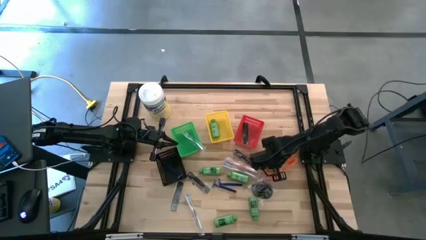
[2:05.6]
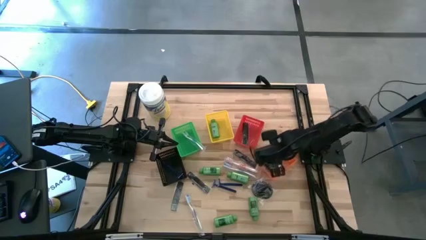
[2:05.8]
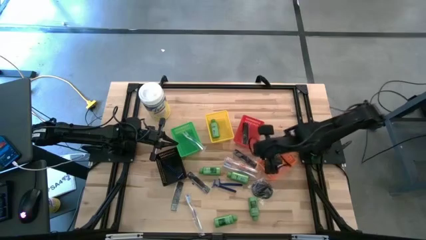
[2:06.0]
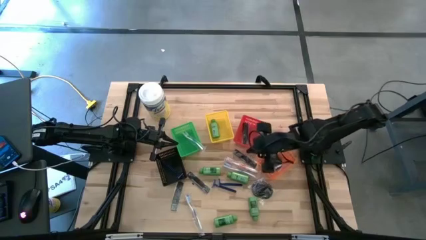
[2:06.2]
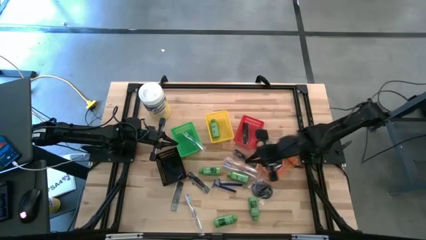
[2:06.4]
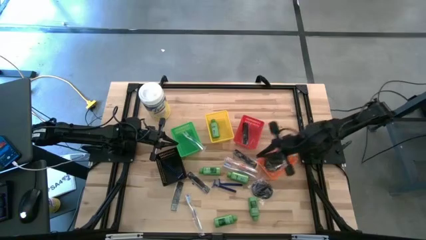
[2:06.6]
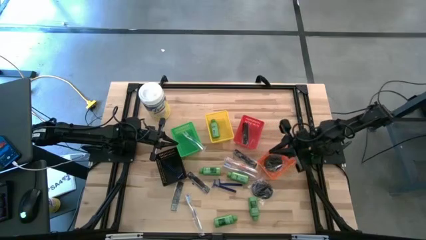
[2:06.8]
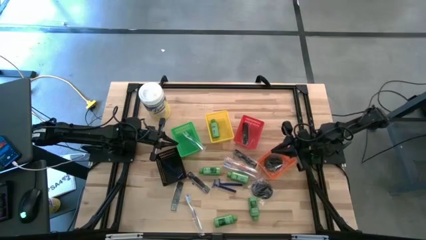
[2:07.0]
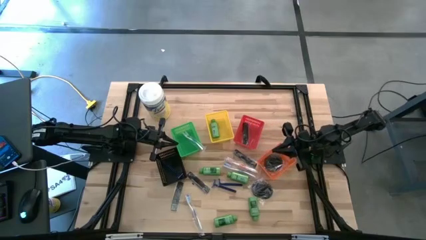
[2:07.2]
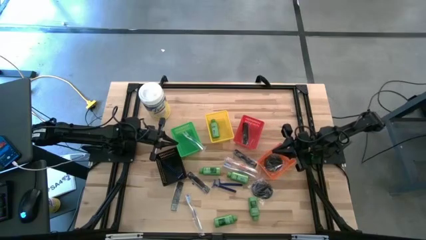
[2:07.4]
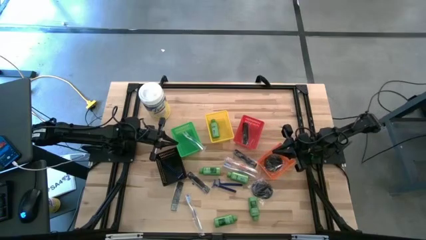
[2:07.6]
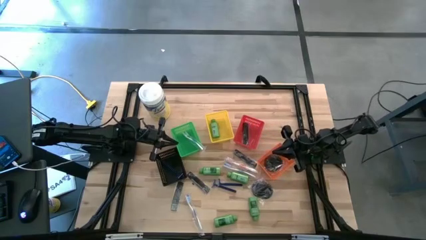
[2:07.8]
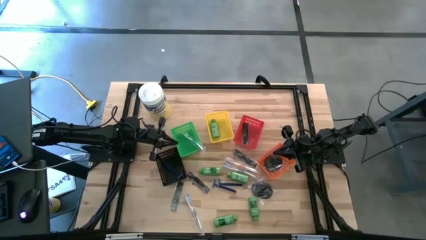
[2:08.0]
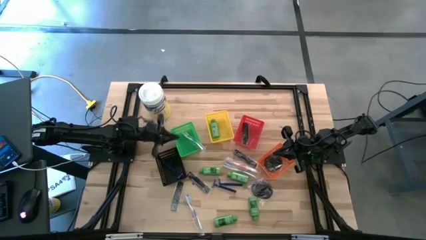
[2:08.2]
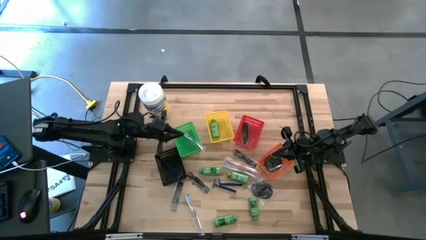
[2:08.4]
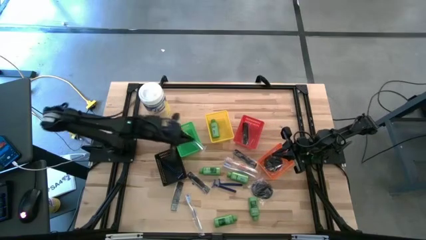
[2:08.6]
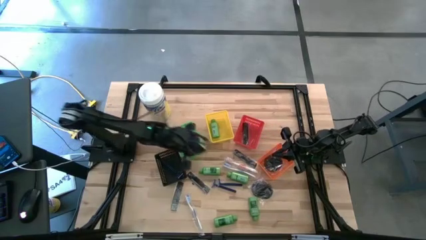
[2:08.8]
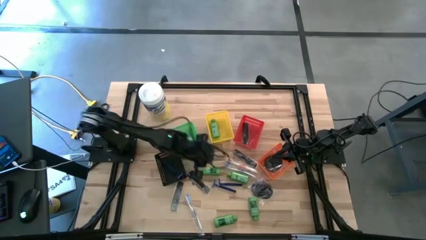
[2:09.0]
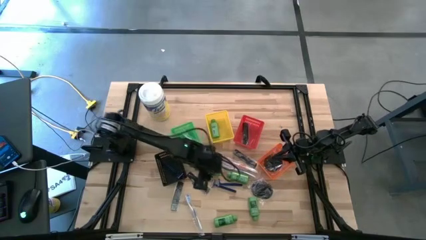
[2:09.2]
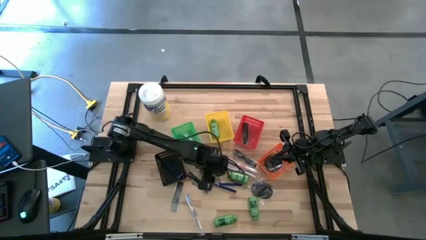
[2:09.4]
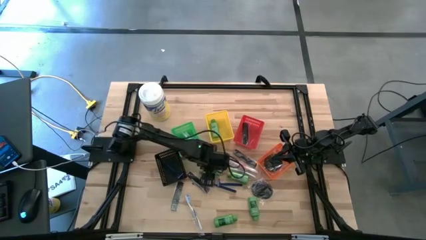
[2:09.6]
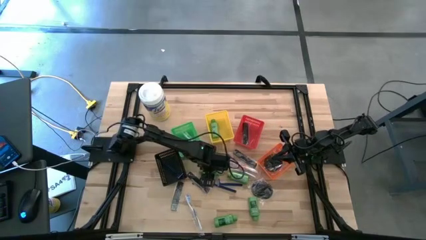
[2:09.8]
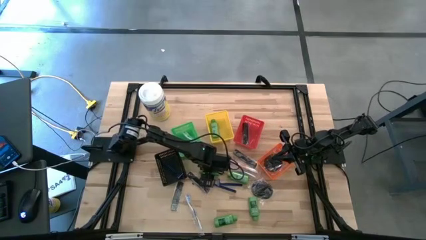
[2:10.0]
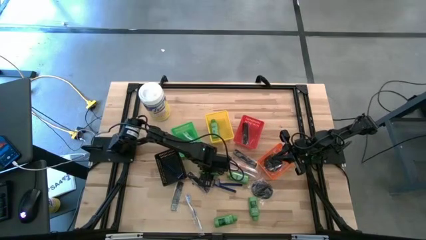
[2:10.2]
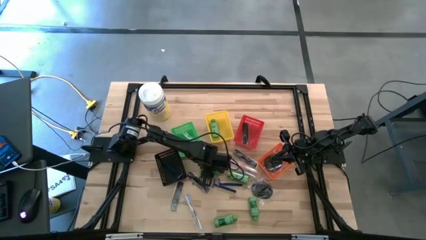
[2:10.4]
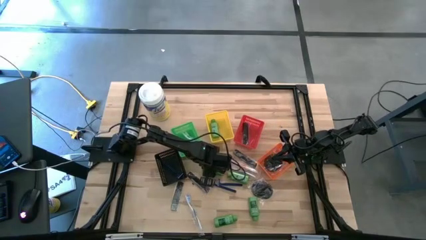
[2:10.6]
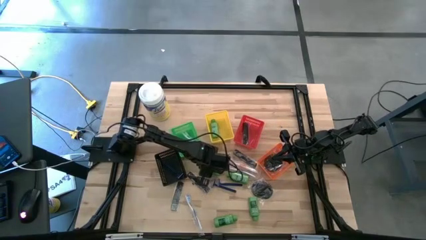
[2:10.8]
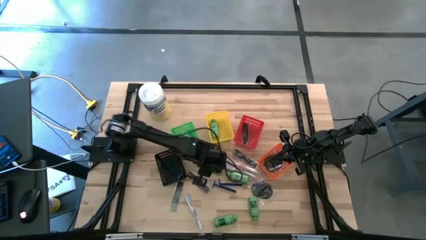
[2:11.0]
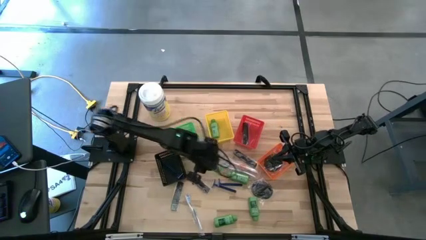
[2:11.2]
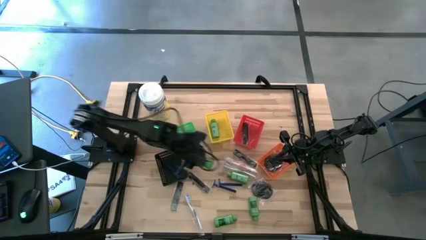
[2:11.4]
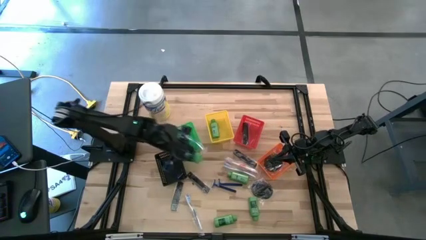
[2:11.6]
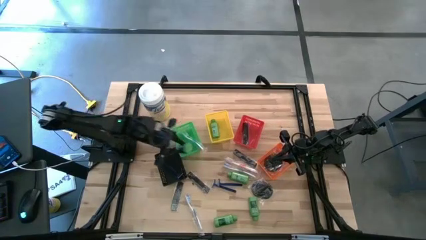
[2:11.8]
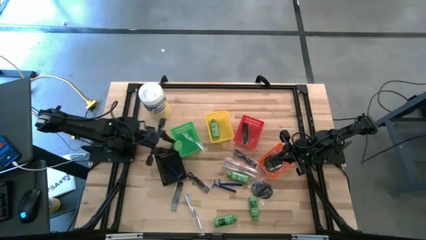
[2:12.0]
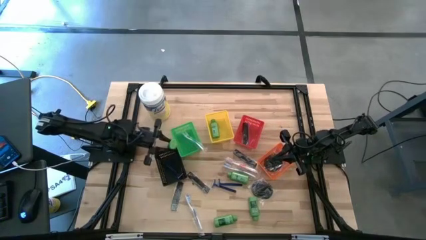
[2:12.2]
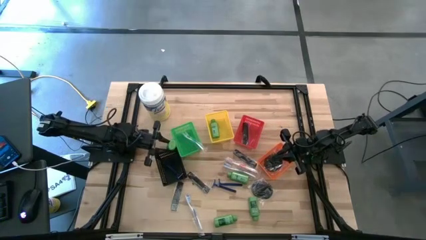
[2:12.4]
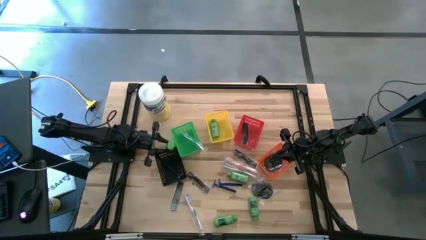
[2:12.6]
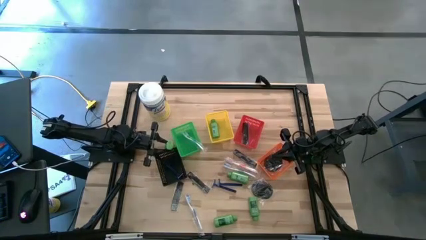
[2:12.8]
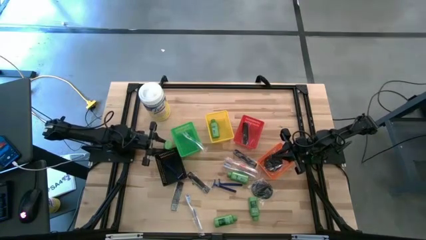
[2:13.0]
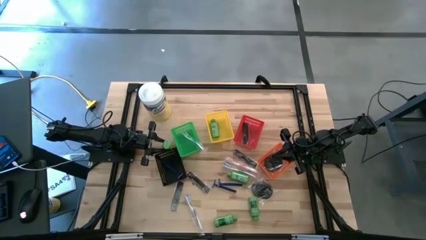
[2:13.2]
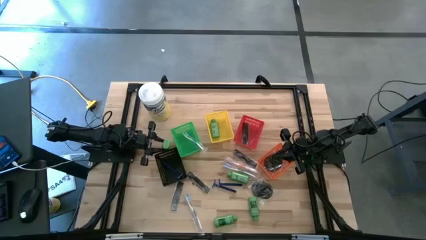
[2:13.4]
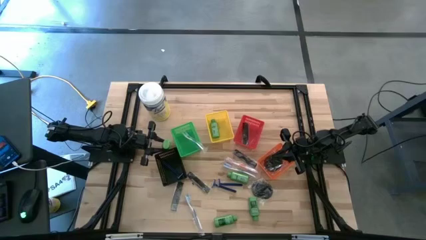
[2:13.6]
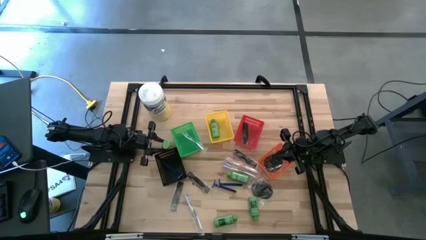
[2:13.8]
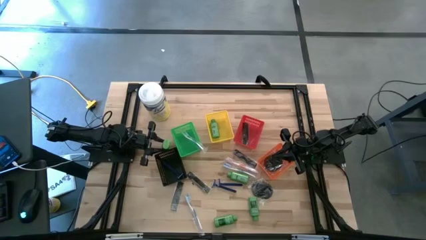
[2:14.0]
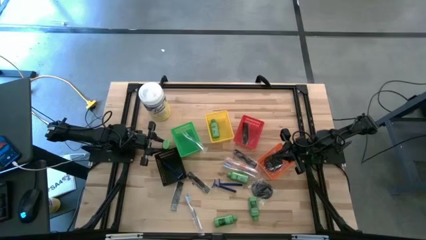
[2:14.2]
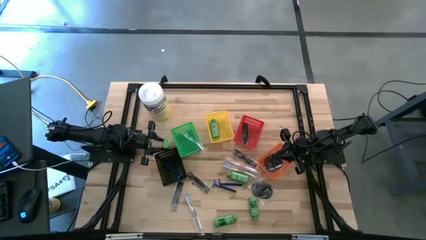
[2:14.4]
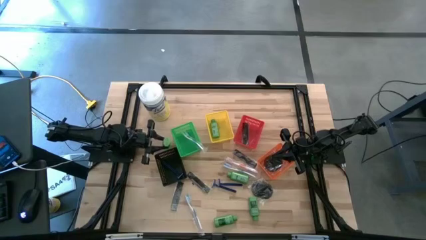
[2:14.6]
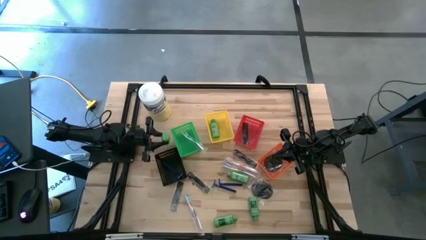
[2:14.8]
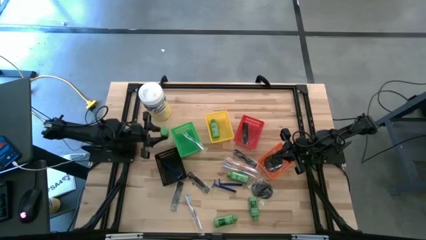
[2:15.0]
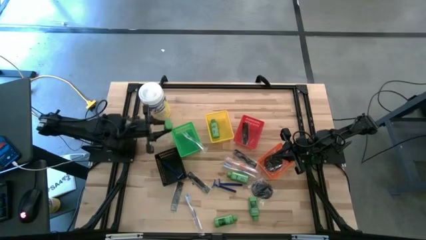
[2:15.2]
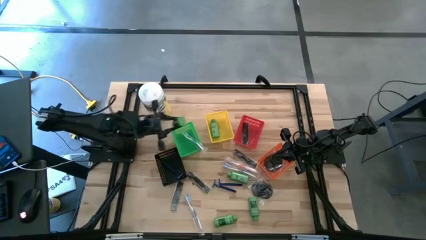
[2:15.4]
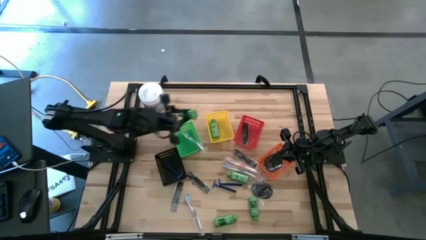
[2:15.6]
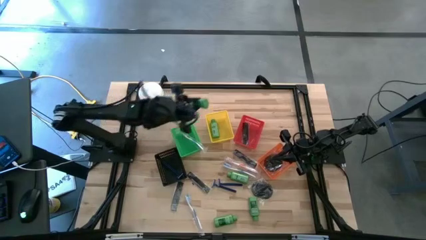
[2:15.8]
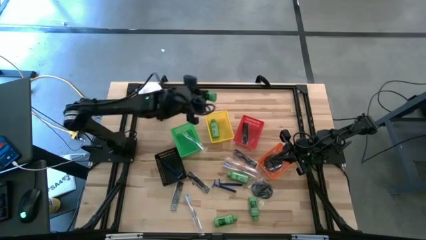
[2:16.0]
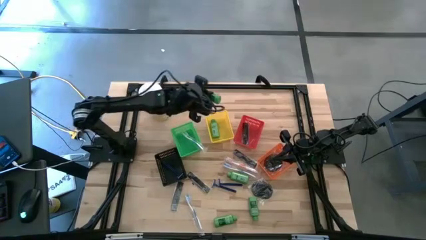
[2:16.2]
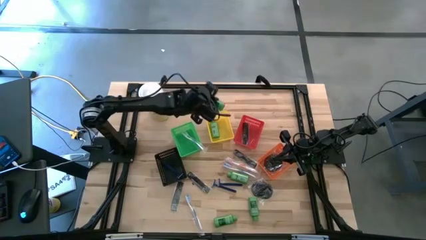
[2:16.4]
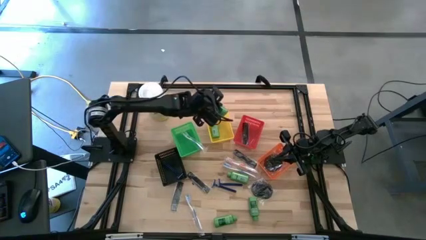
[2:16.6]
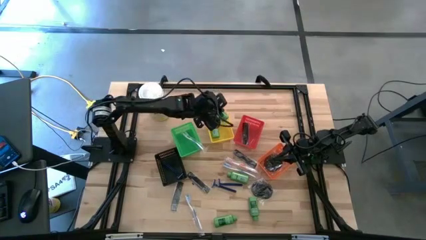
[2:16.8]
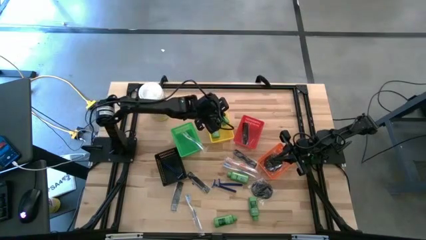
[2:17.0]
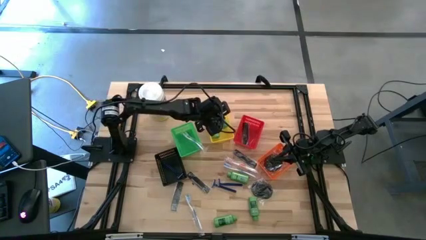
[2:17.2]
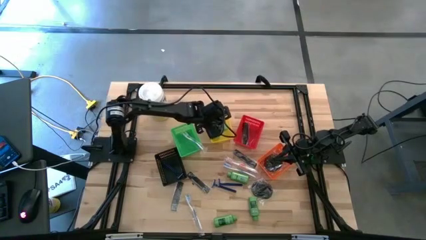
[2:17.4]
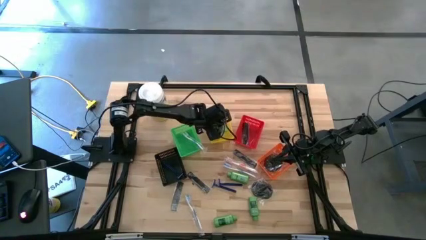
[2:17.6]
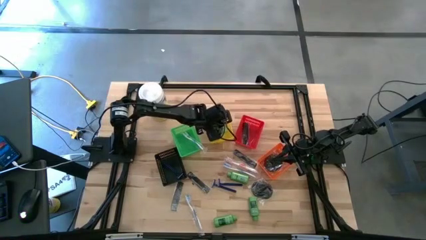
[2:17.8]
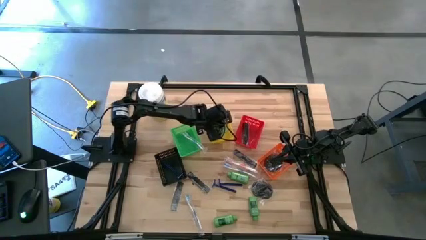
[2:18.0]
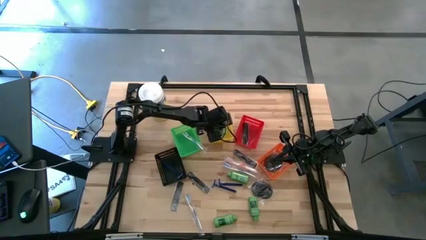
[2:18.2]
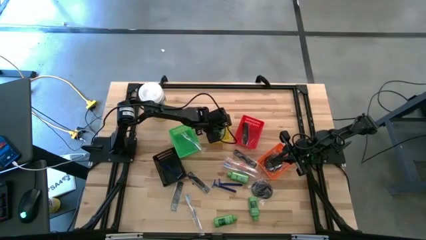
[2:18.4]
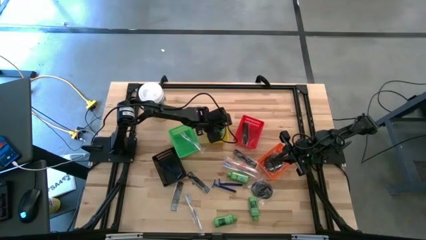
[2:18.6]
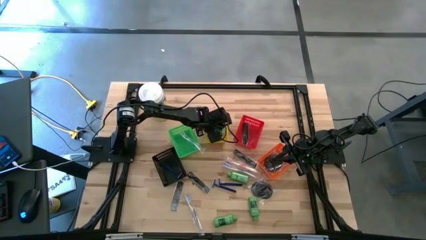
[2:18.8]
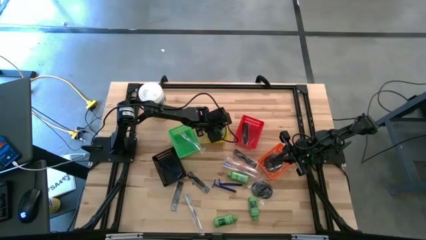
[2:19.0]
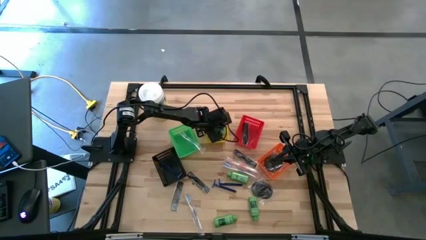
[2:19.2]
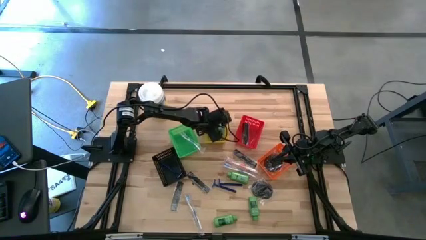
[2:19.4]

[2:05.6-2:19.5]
Task: Pick & Place Travel size toiletries
Put the green shampoo into the yellow bin
